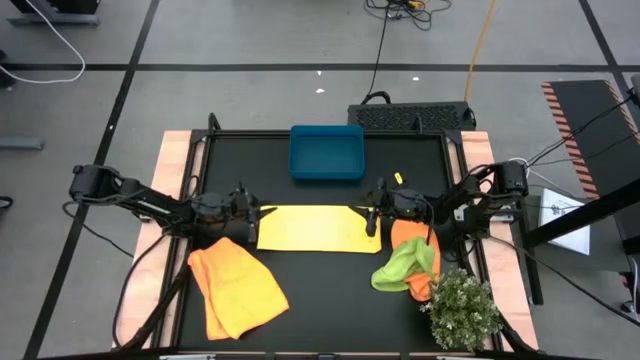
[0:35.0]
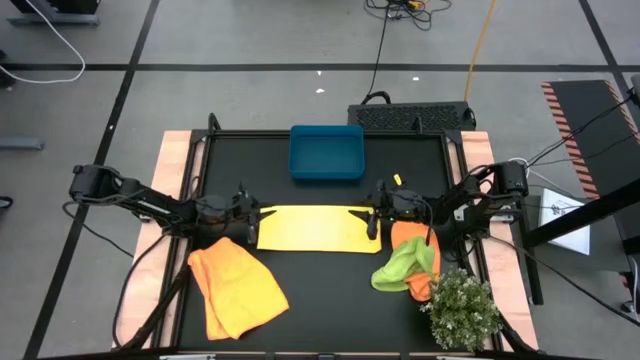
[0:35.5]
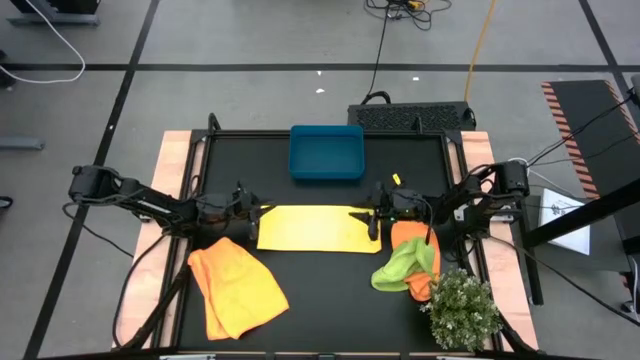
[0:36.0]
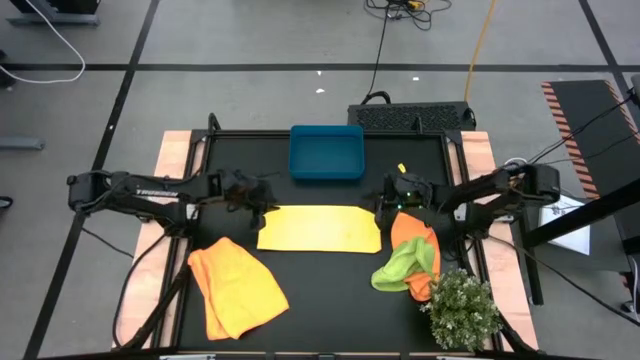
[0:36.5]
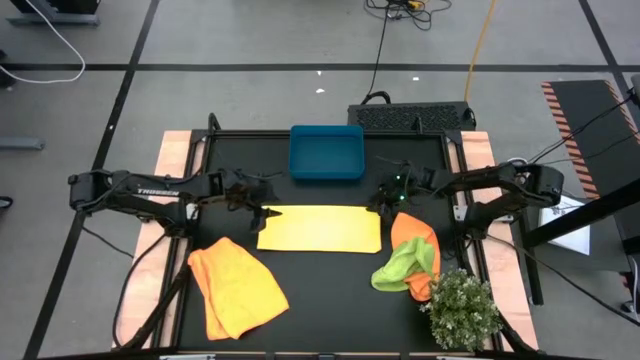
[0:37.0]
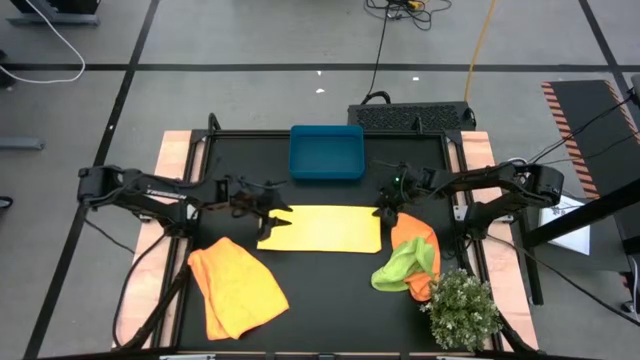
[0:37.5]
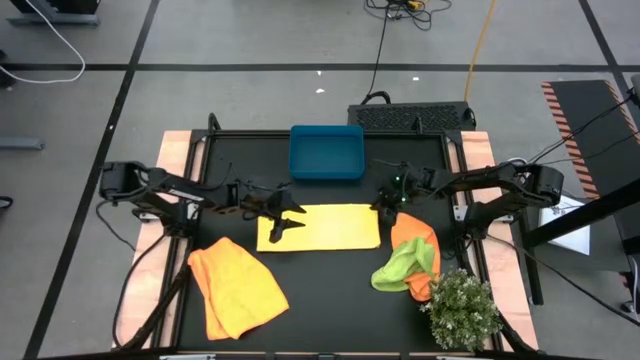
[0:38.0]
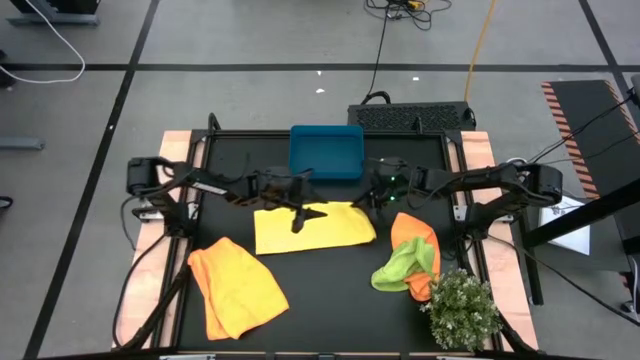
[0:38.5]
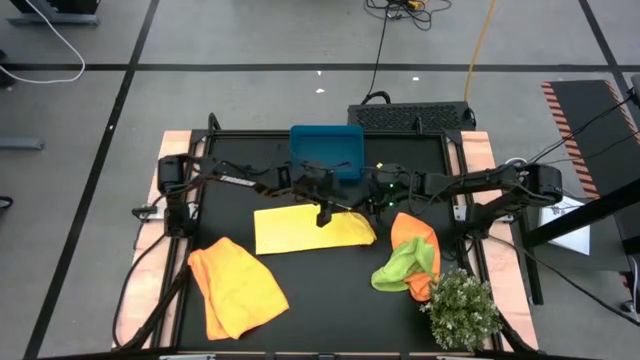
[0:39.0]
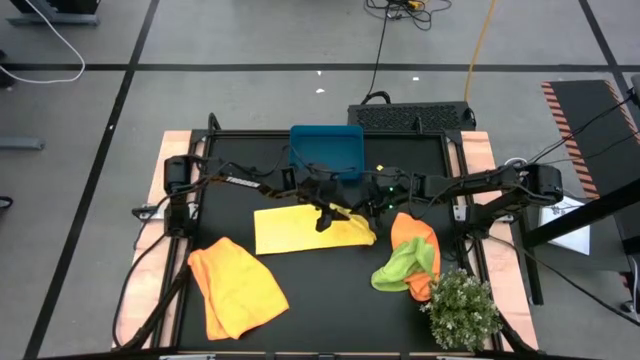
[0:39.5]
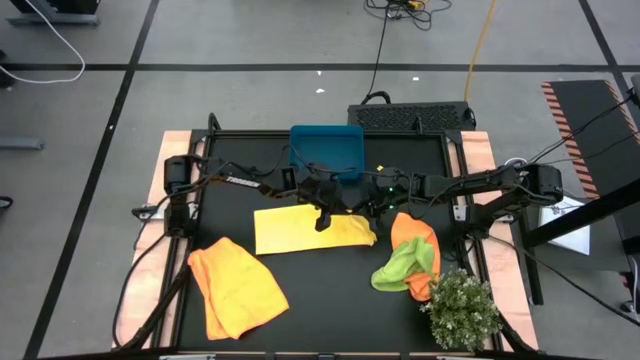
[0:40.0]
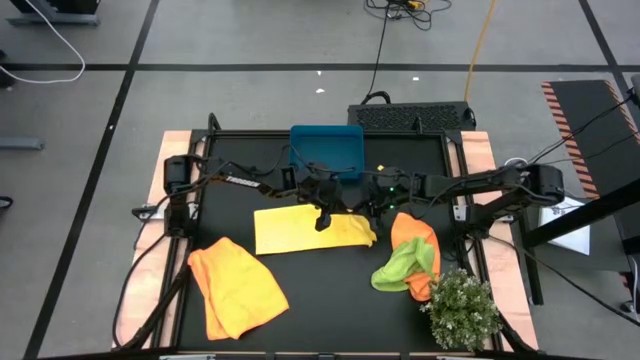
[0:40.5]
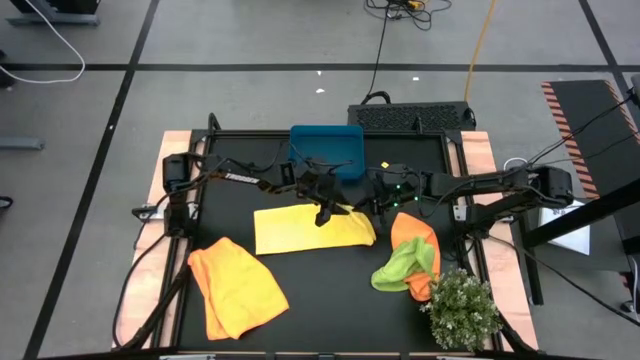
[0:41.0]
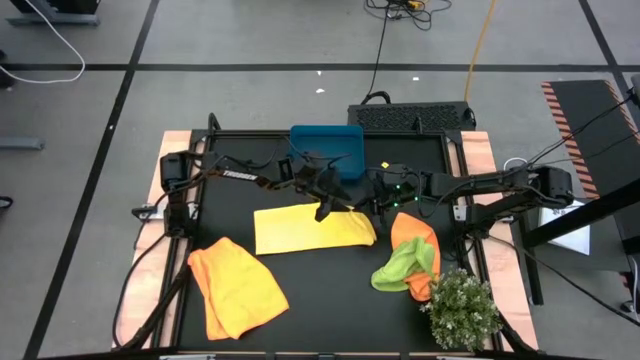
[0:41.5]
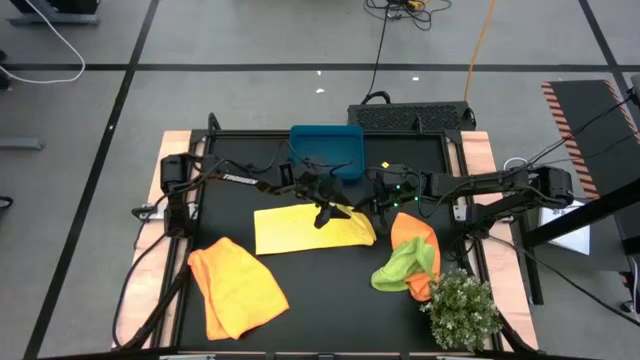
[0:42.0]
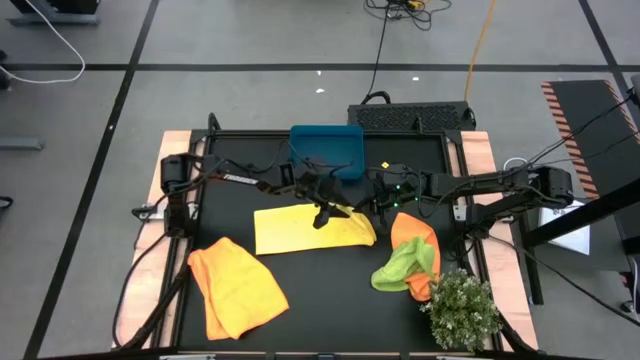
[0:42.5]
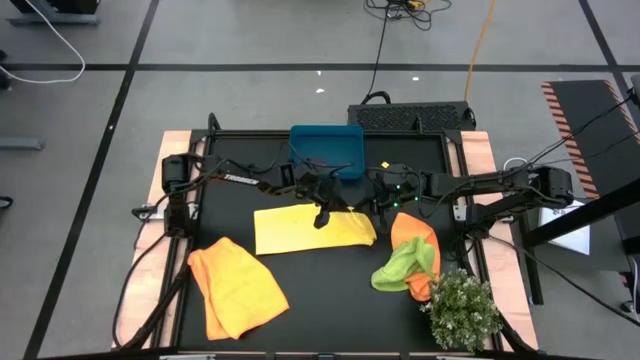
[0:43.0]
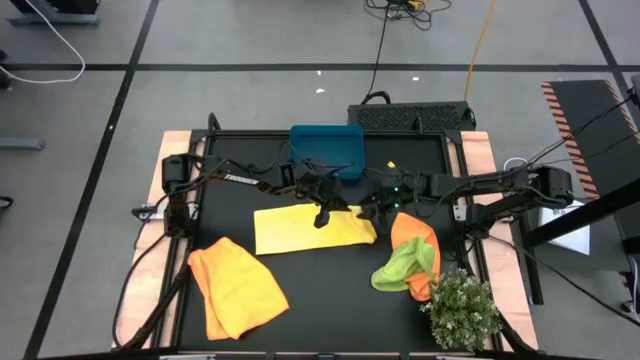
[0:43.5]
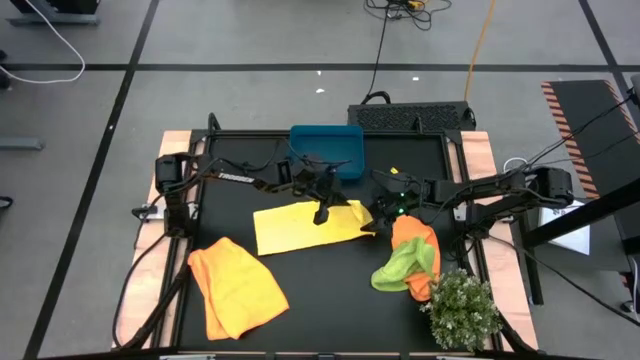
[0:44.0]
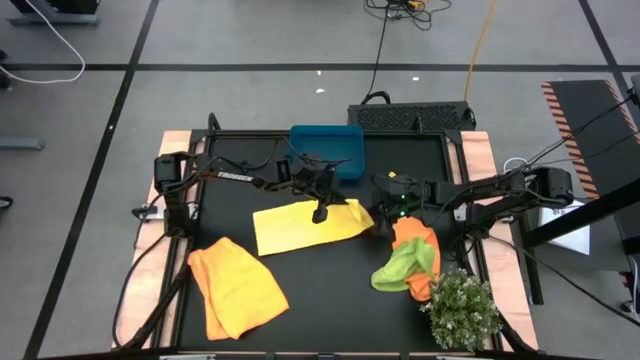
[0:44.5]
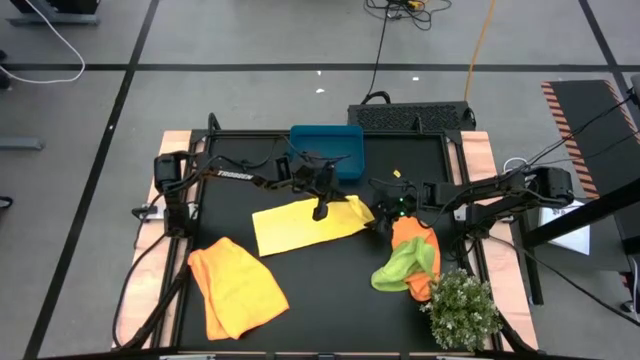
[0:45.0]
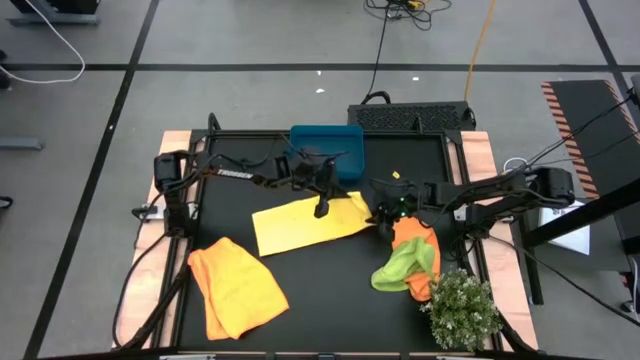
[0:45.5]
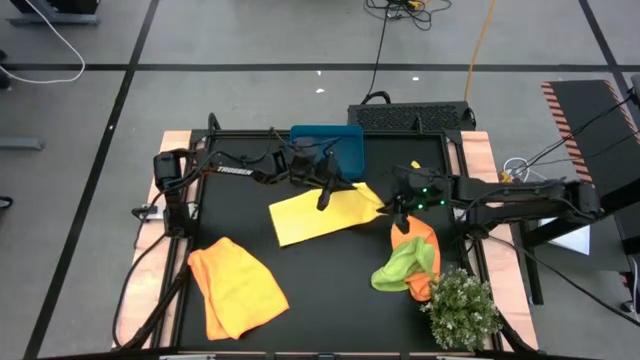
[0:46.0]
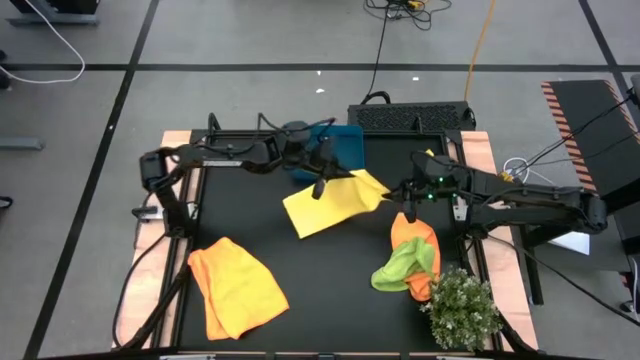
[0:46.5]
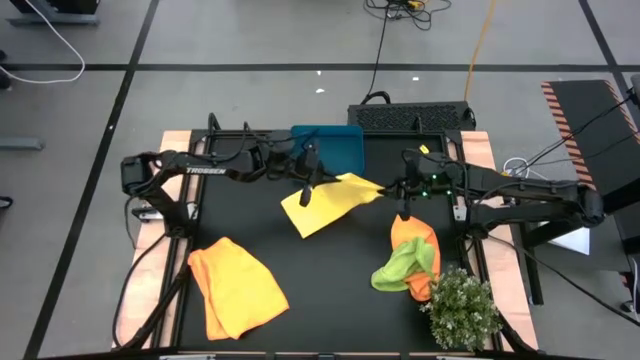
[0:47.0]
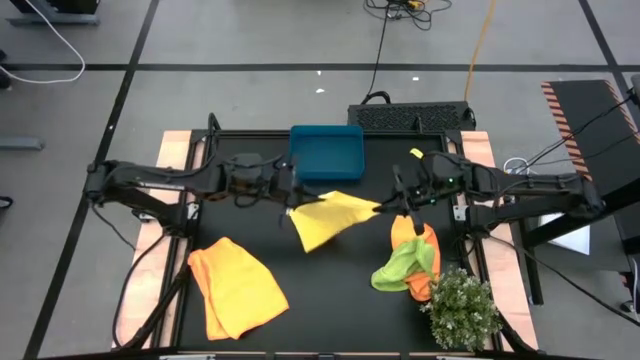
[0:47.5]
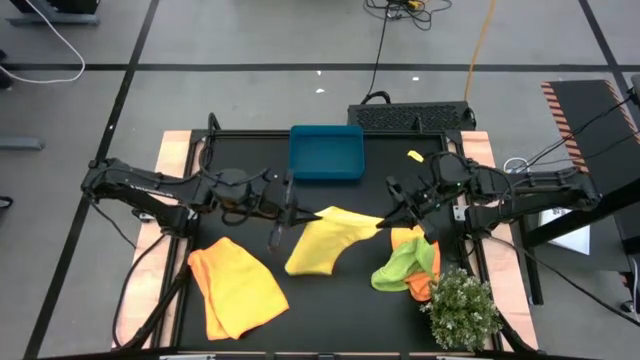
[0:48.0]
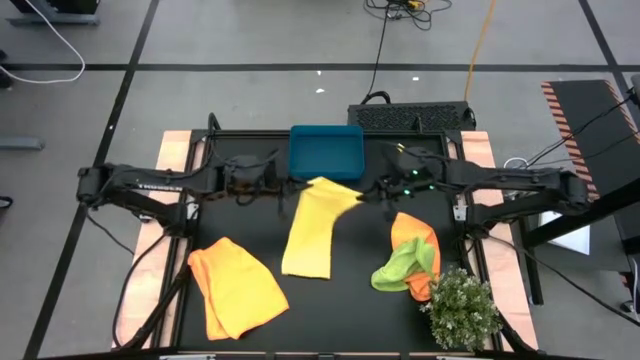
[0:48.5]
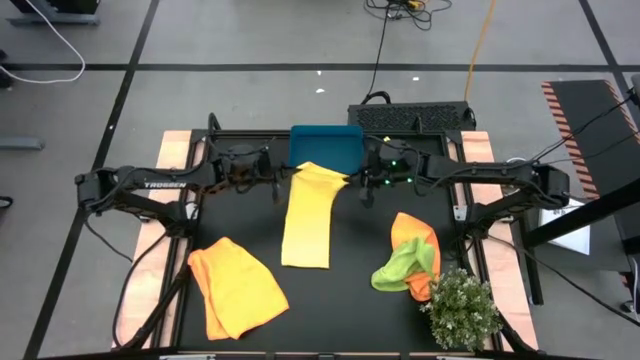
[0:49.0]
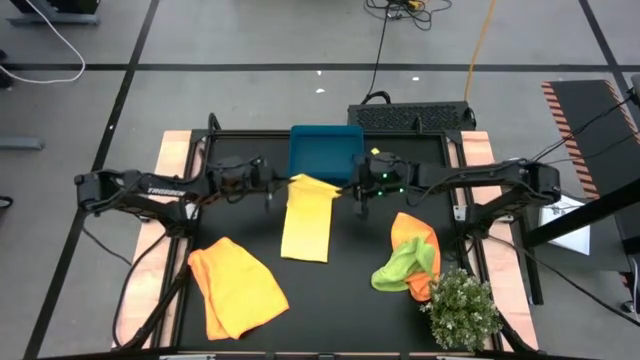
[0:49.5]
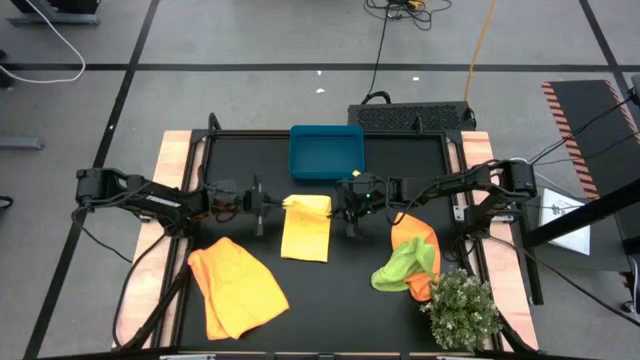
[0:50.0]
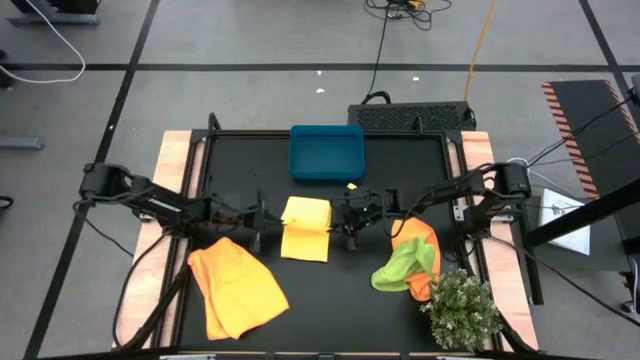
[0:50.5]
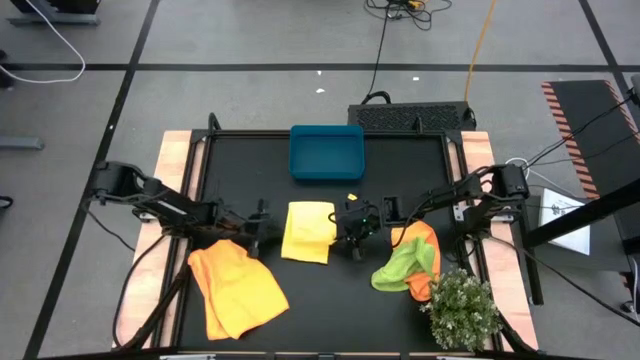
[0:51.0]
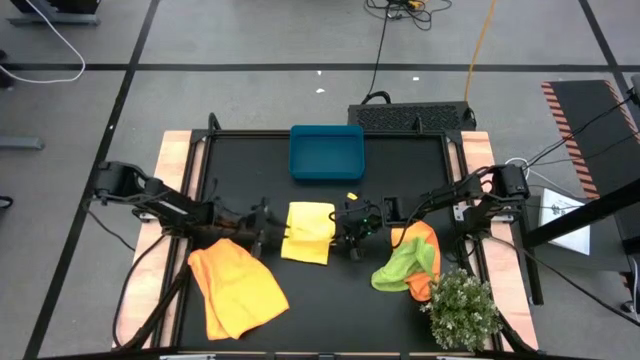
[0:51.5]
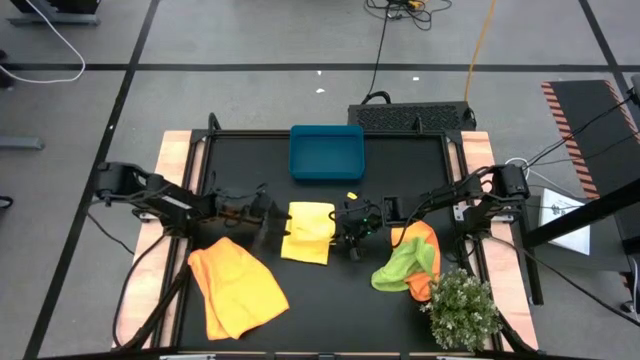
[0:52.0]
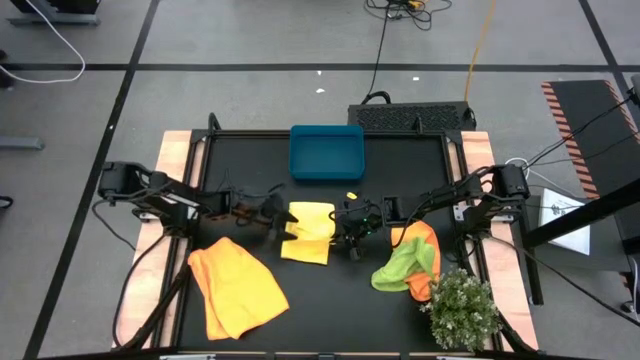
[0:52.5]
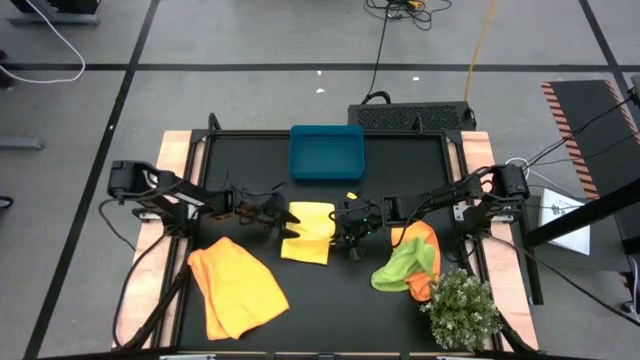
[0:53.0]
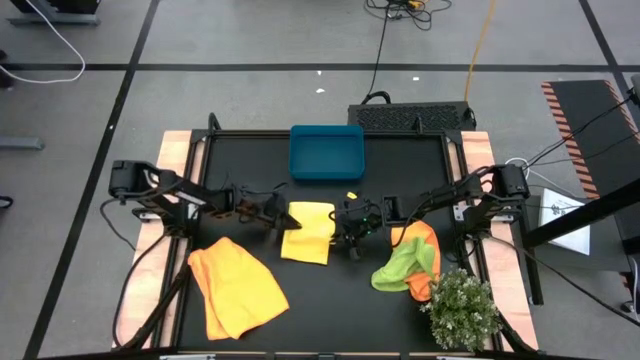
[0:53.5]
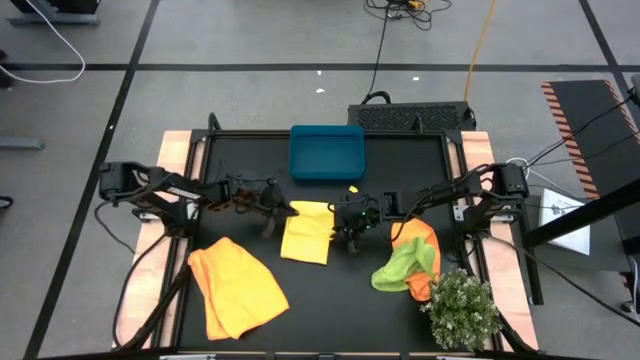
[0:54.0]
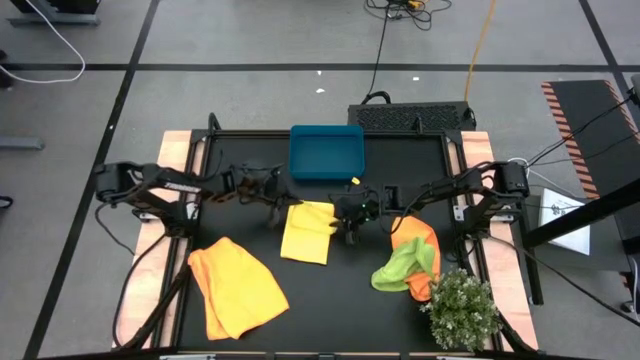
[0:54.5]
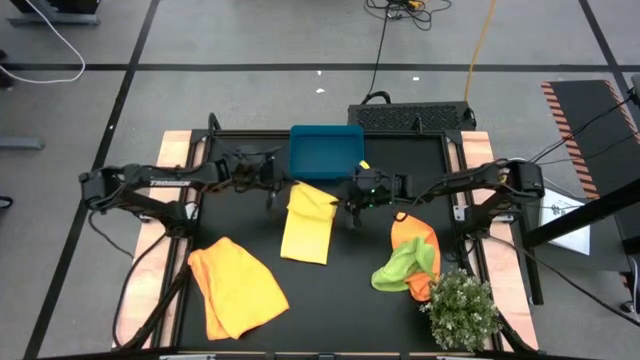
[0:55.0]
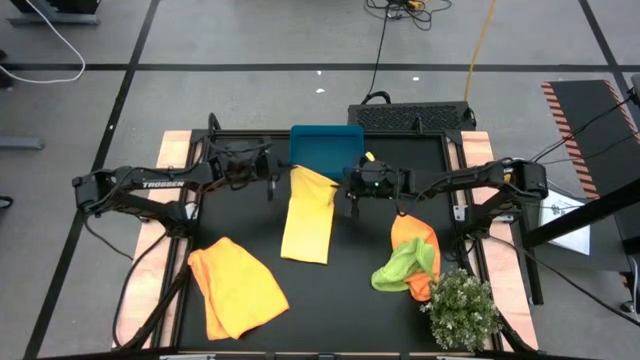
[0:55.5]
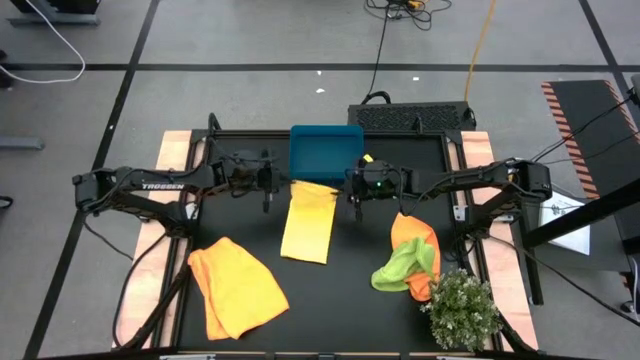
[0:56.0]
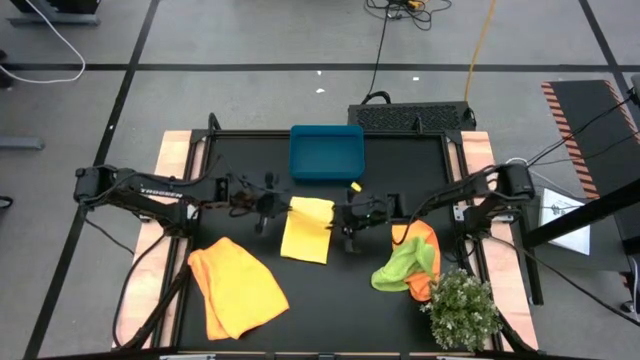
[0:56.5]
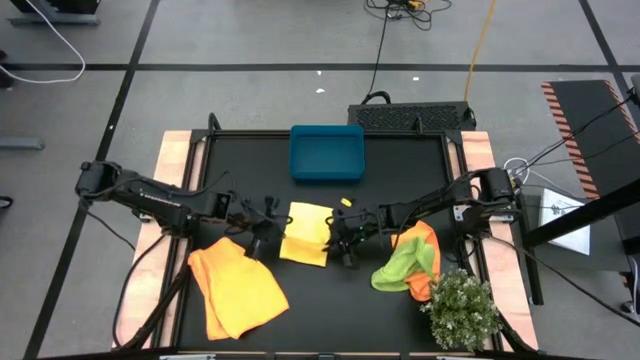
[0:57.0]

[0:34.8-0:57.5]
Task: Fold microfiber towels
Fold the yellow microfiber towel
